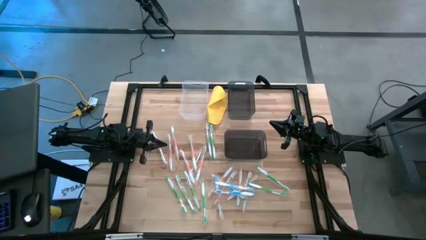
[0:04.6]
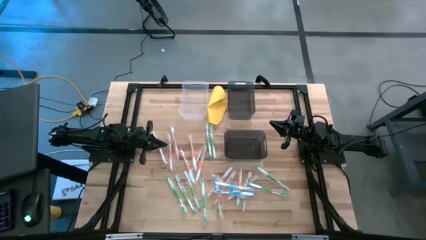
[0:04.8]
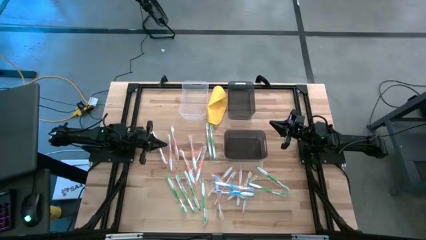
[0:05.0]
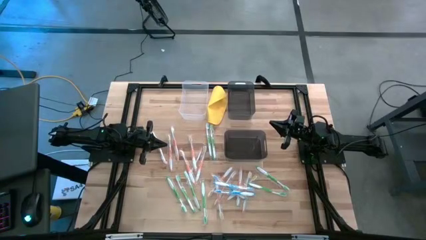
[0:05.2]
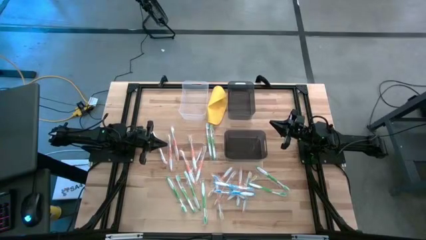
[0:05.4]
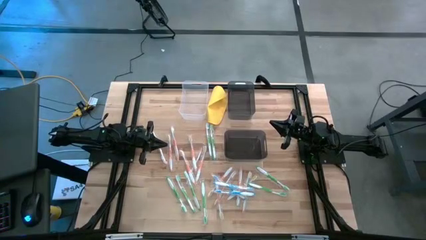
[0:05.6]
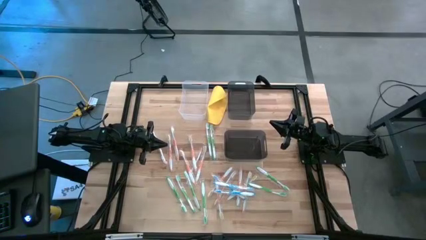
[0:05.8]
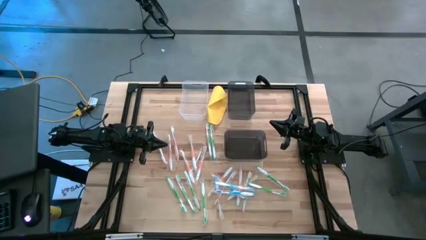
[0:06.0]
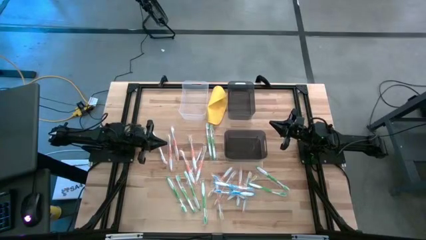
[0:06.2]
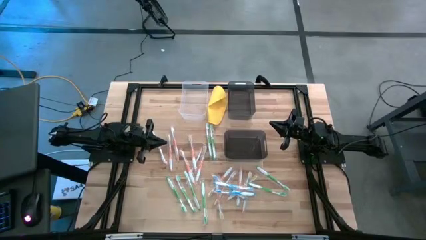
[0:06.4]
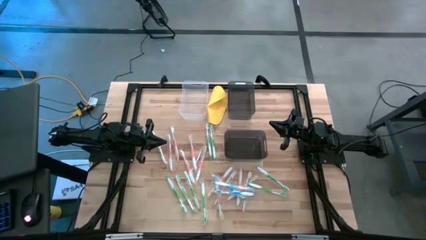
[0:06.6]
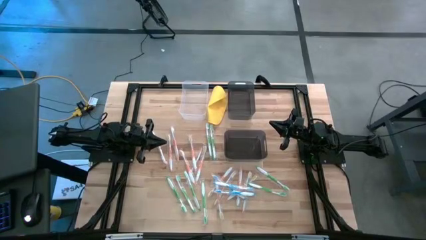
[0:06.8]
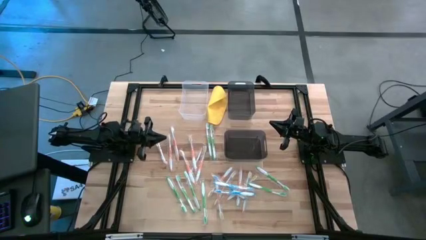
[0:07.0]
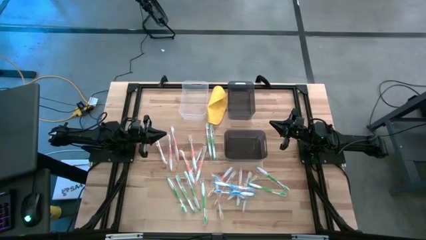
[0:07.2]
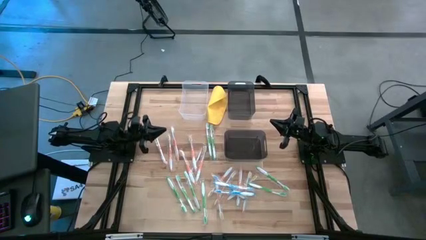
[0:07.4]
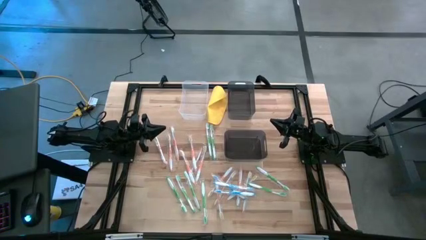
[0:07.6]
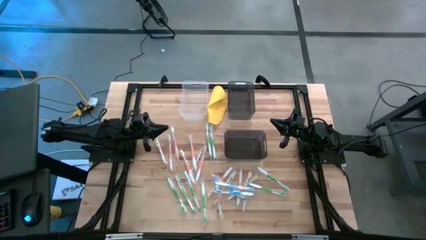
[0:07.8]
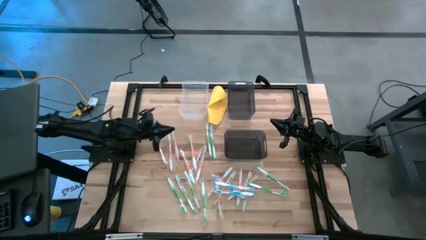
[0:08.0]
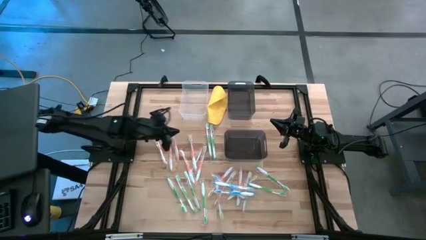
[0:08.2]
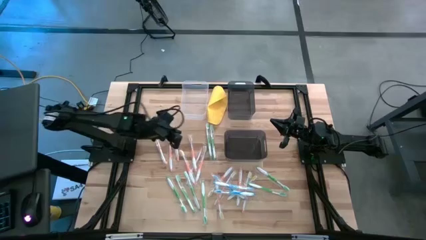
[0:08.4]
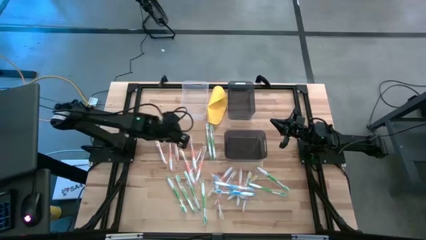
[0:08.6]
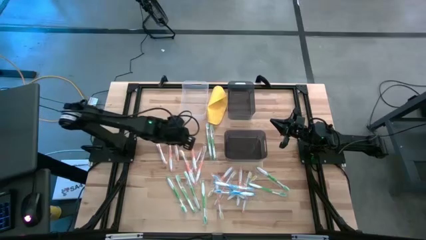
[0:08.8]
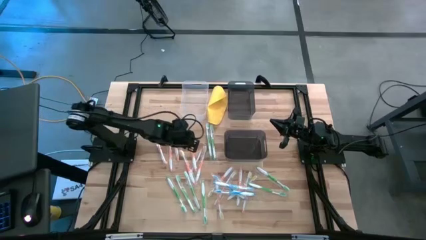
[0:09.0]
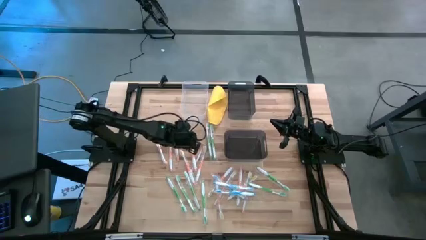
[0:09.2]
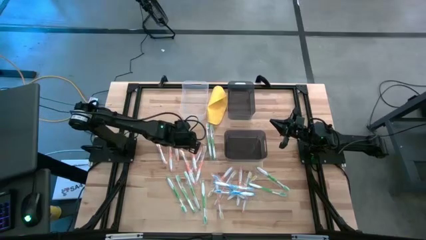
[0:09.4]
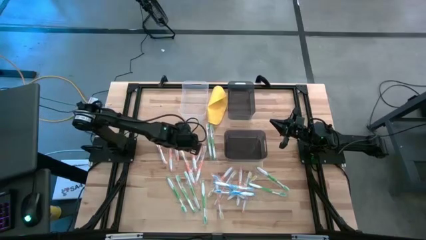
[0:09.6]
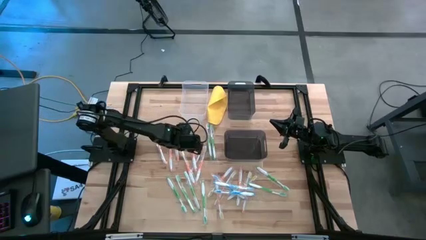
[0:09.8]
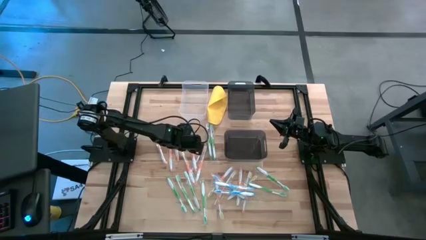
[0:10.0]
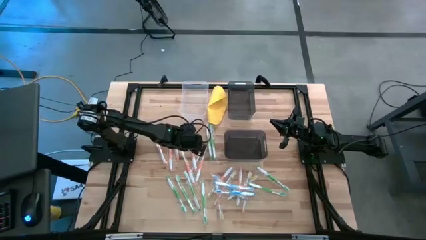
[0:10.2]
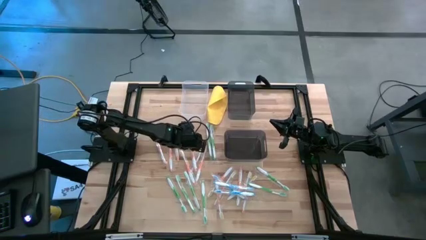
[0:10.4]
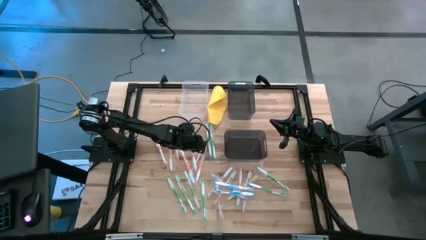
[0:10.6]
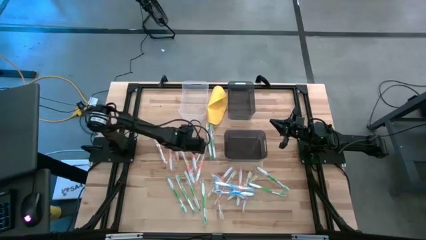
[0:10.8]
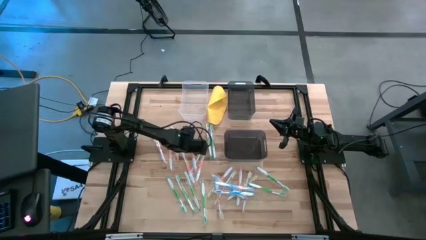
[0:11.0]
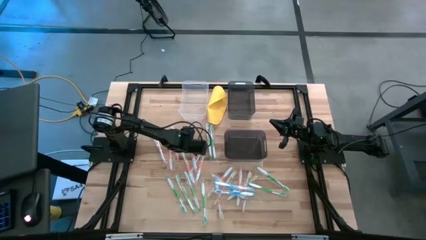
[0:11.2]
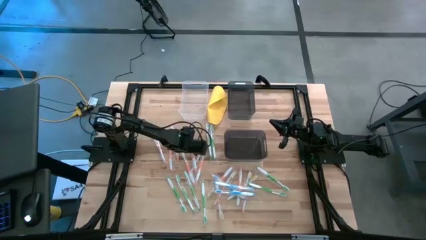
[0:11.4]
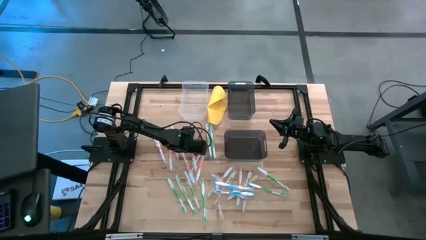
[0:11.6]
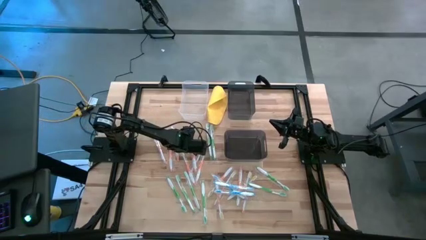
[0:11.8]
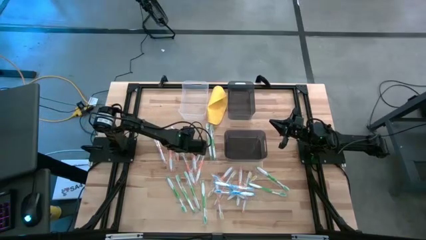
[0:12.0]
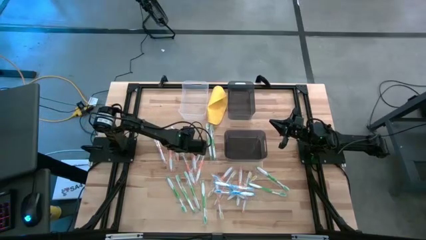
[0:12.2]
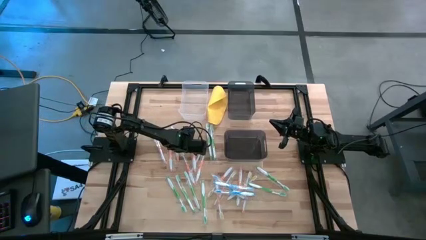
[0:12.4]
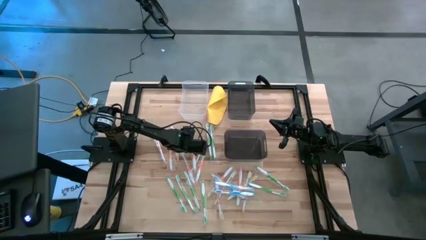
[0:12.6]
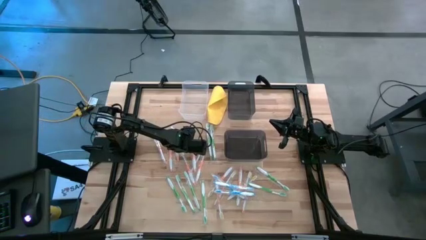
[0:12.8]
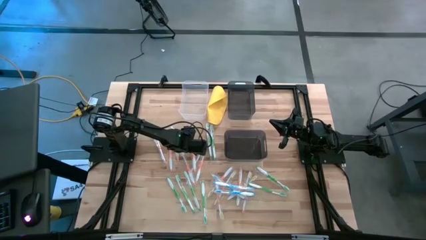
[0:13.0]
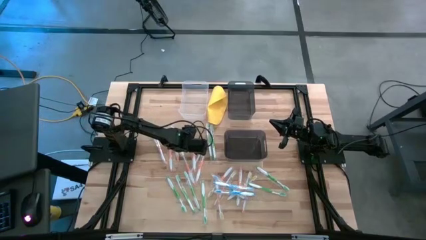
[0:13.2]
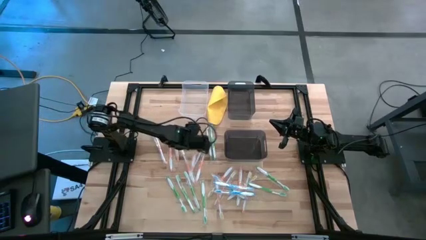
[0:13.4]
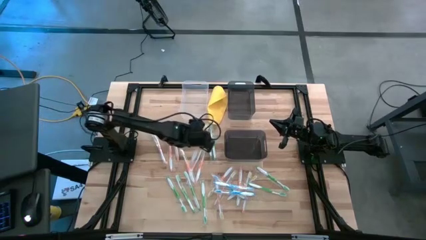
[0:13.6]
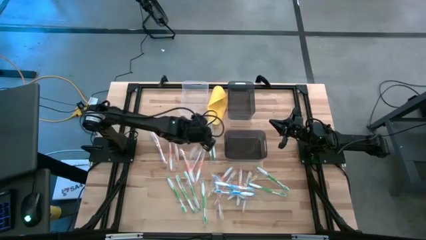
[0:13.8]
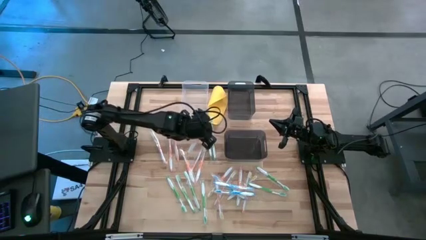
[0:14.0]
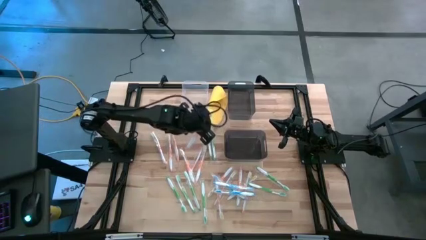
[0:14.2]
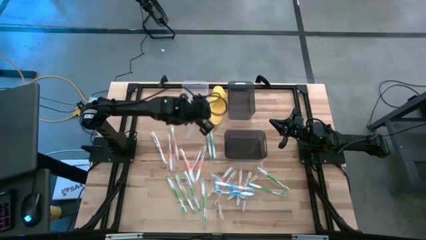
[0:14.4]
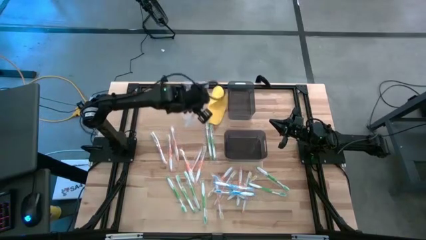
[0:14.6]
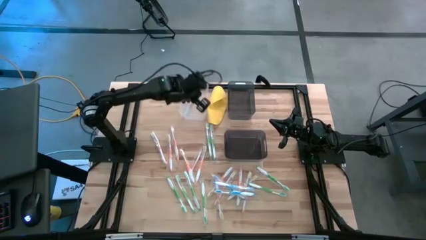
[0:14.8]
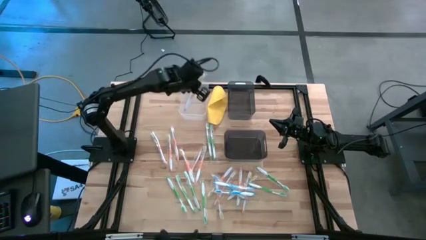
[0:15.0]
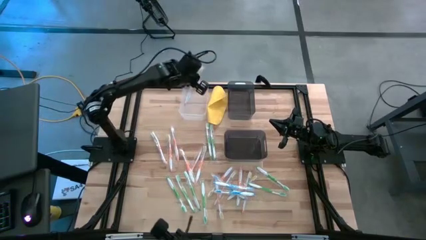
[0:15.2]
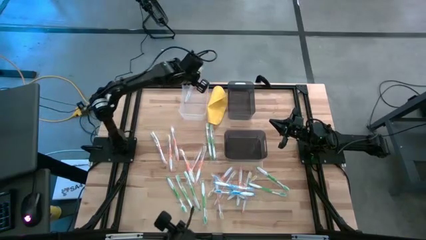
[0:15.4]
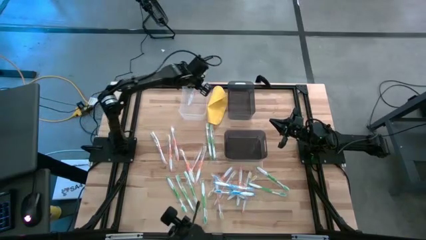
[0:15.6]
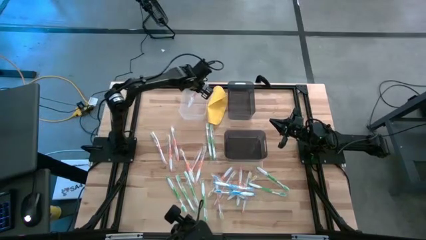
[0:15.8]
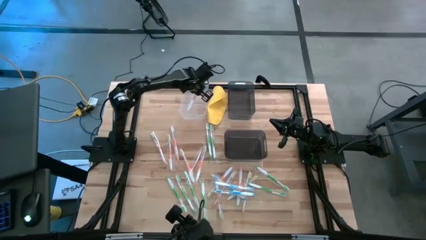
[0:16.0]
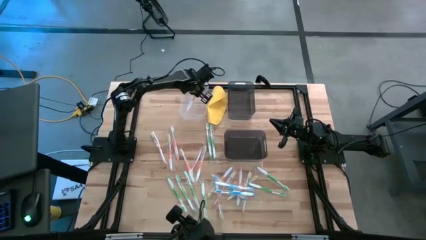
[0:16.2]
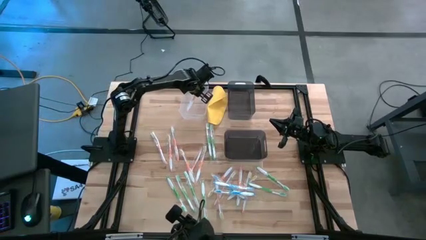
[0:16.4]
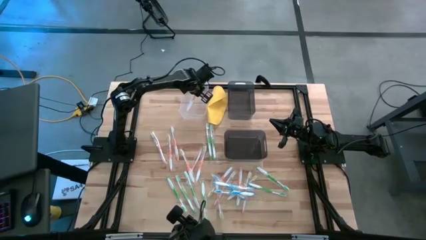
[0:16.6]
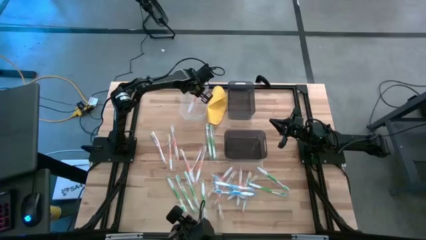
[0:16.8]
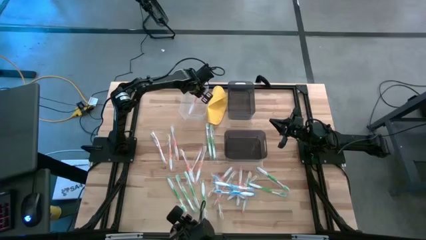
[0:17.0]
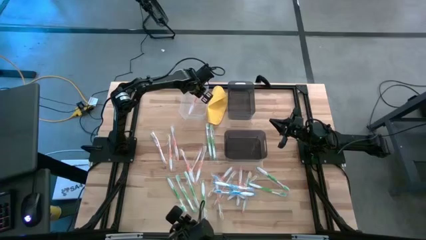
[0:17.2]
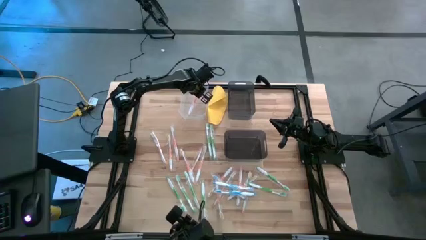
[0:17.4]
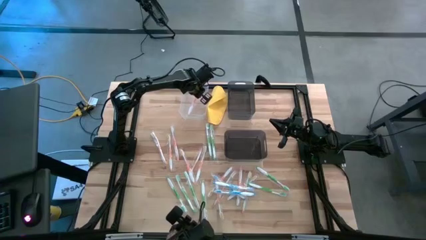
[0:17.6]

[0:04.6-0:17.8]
Task: Pick & Place Toothbrushes
Put the orange toothbrush into the transparent bin
